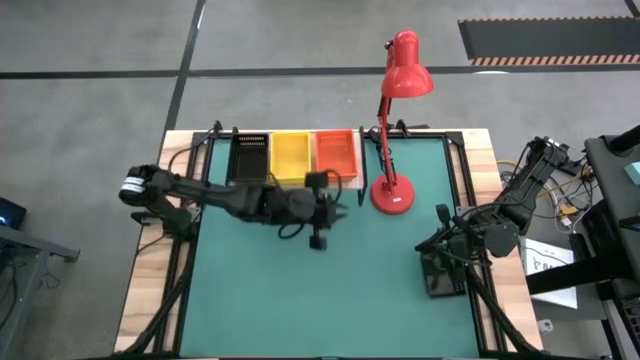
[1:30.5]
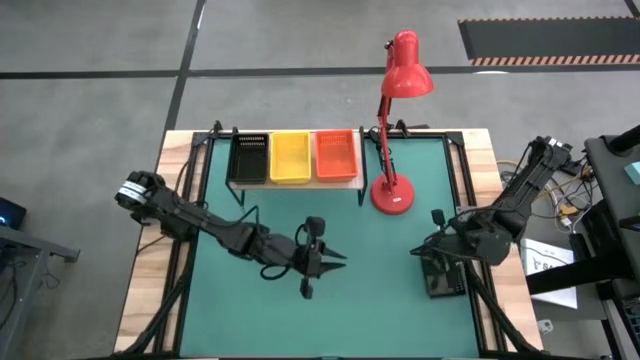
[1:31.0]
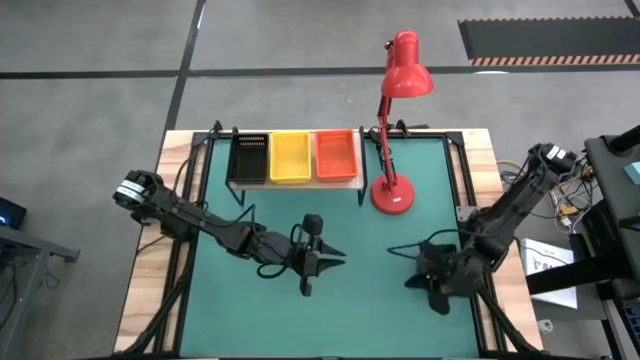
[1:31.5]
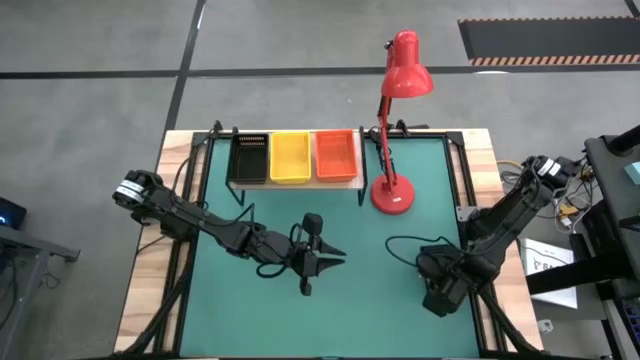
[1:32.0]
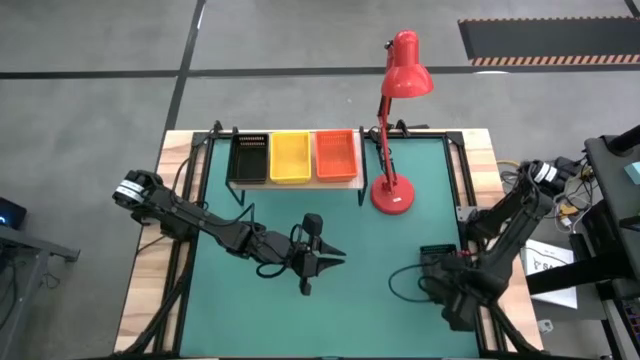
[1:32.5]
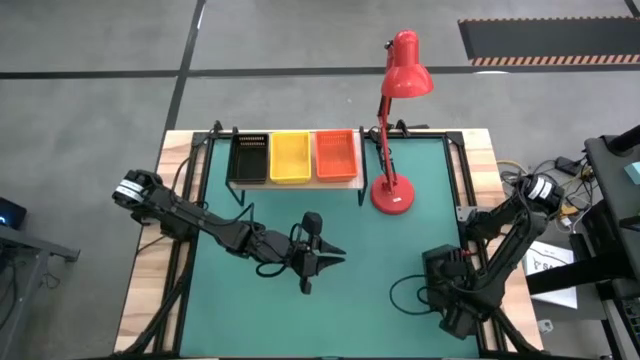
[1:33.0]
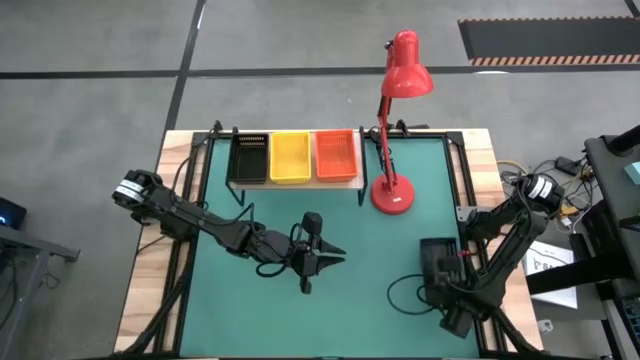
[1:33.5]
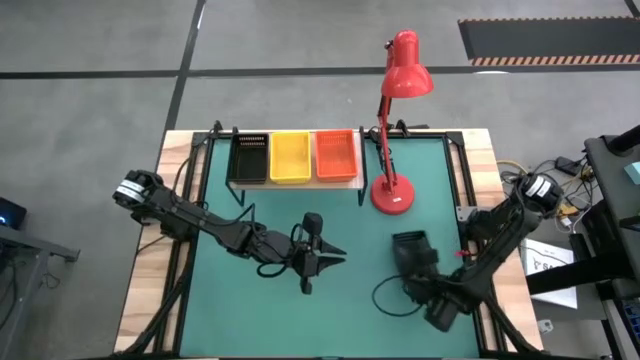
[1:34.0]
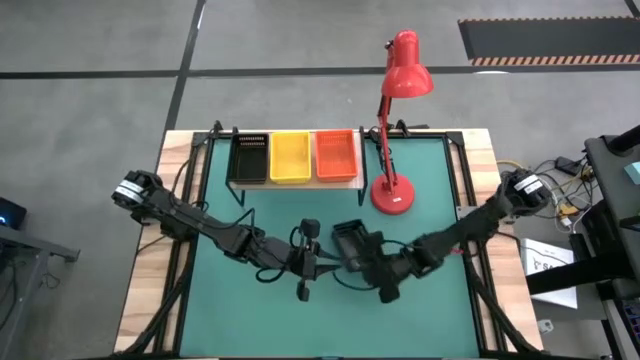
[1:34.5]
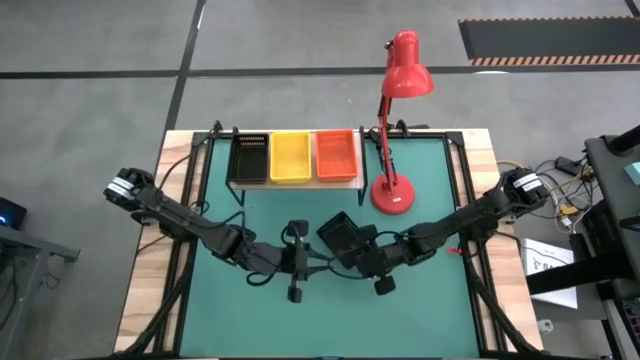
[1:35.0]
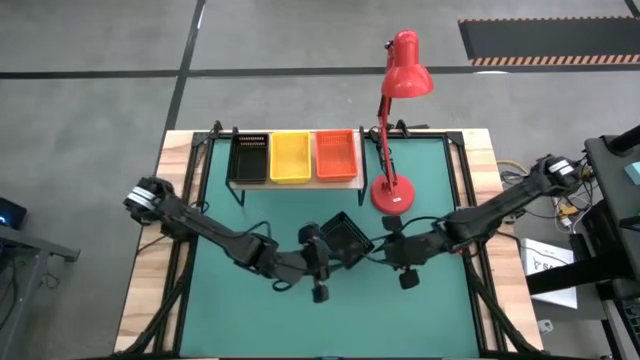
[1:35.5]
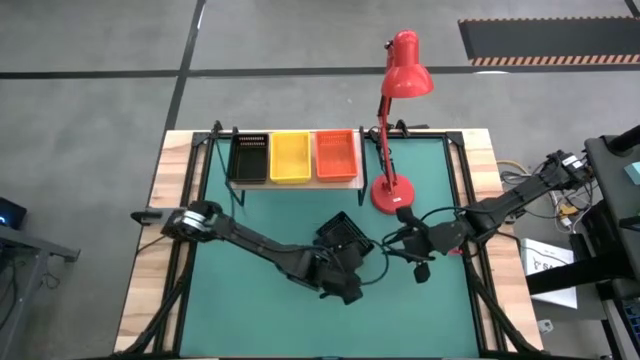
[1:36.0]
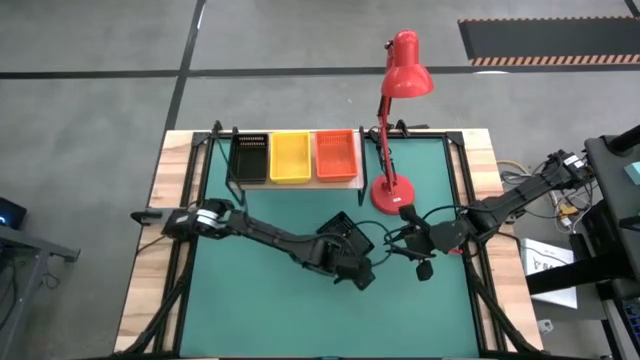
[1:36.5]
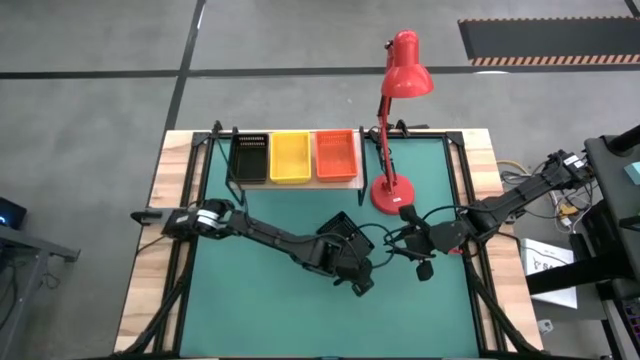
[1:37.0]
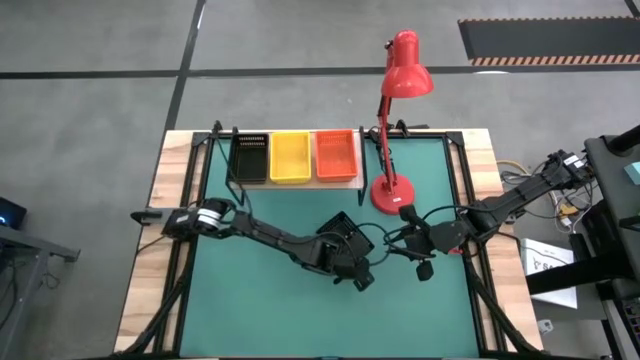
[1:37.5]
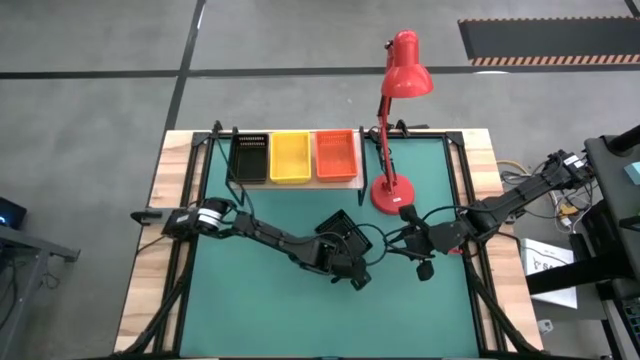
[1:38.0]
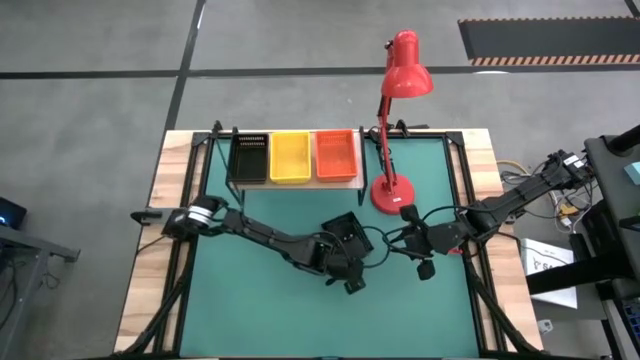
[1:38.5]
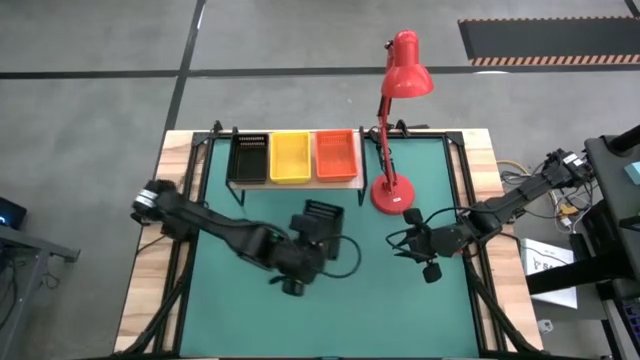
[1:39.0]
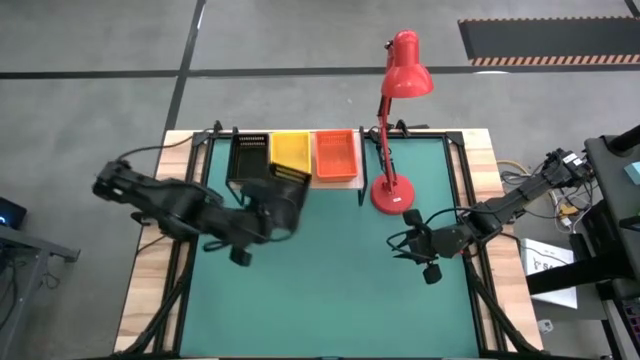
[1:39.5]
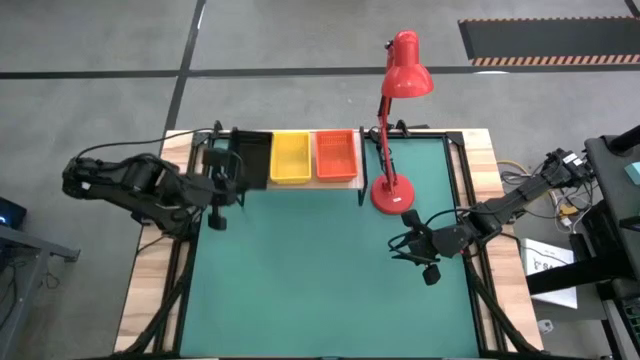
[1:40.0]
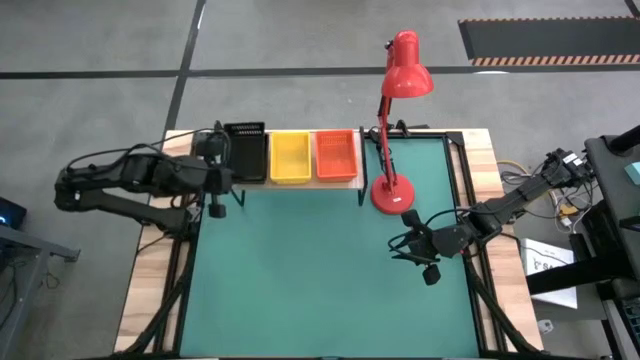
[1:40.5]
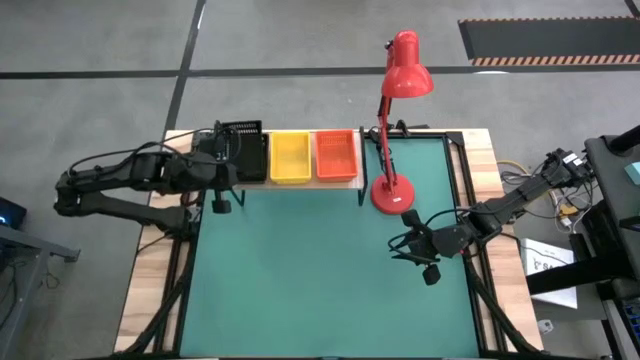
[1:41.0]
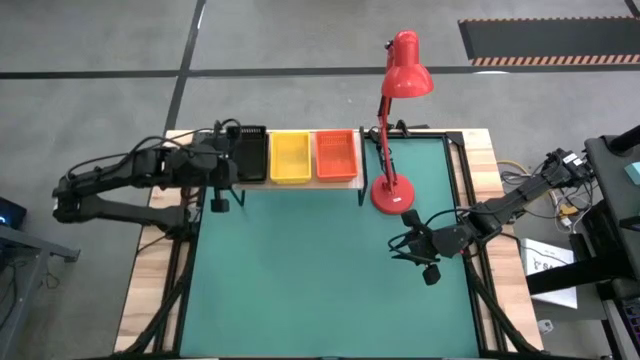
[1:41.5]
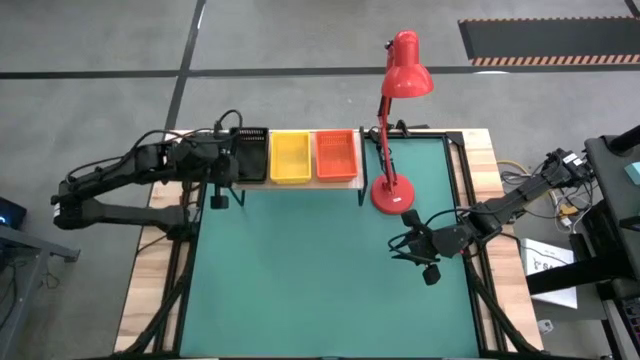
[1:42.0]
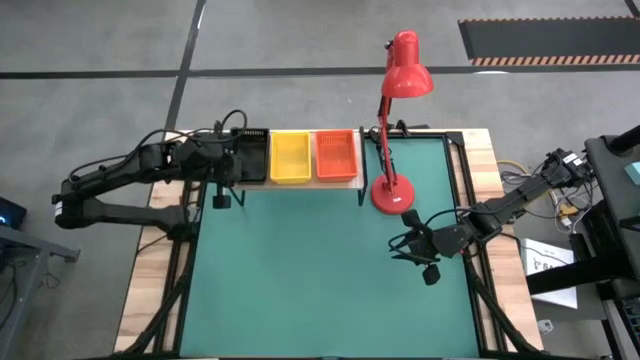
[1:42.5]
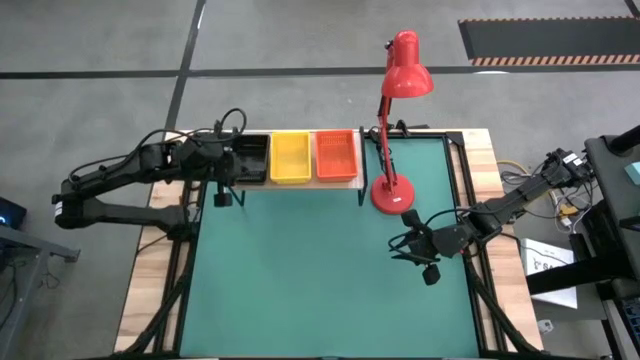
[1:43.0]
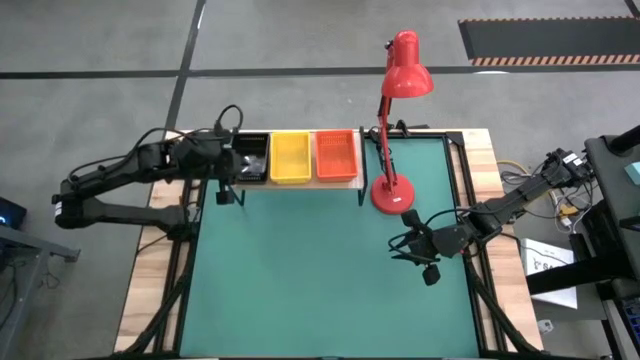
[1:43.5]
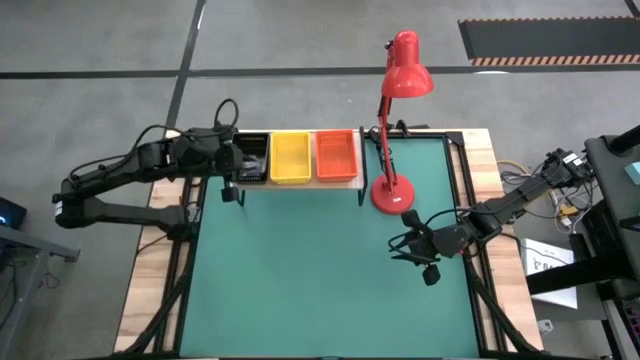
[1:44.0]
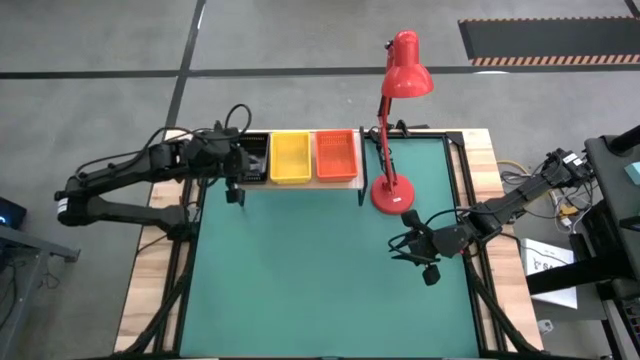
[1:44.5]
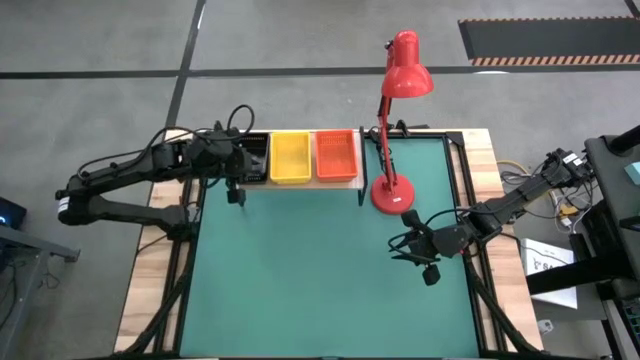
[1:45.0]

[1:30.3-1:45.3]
Task: Stack baskets on shelf by color
Stack the black bin on top of the black bins on the shelf

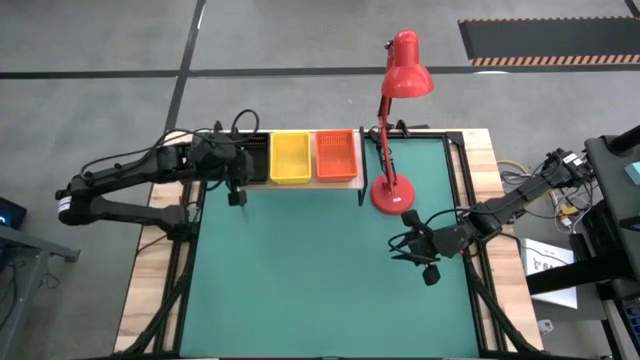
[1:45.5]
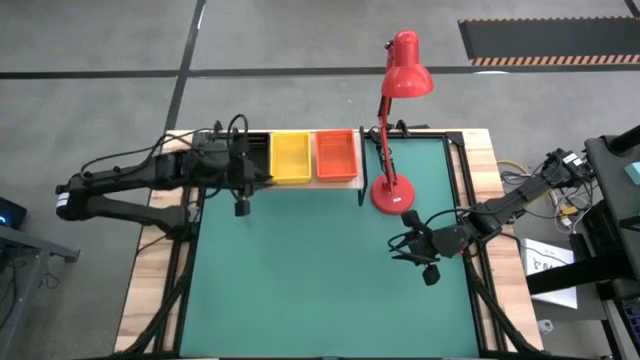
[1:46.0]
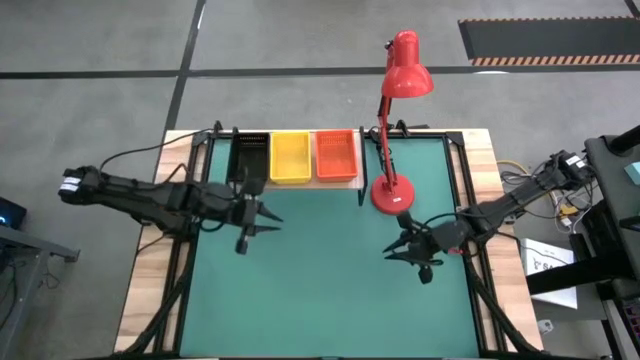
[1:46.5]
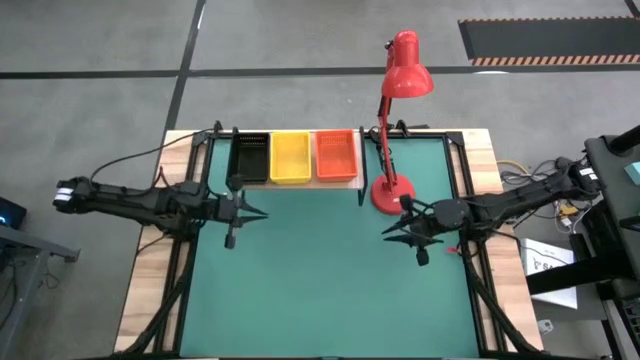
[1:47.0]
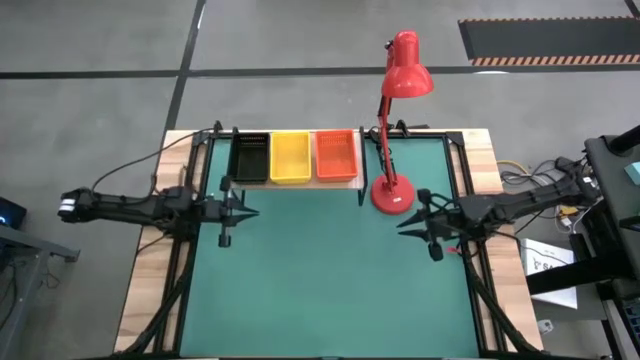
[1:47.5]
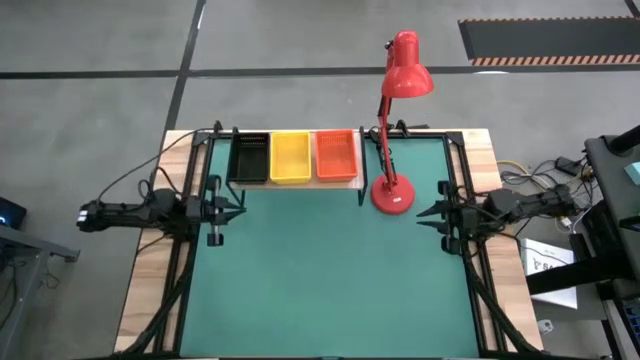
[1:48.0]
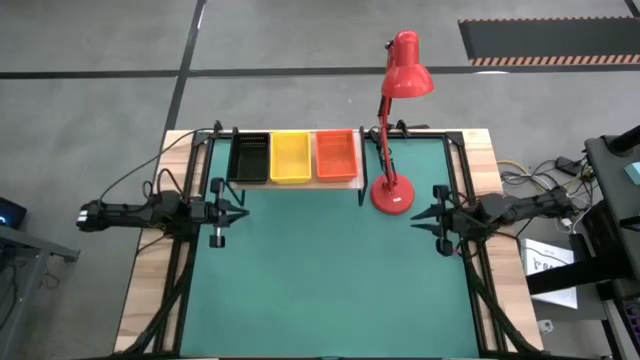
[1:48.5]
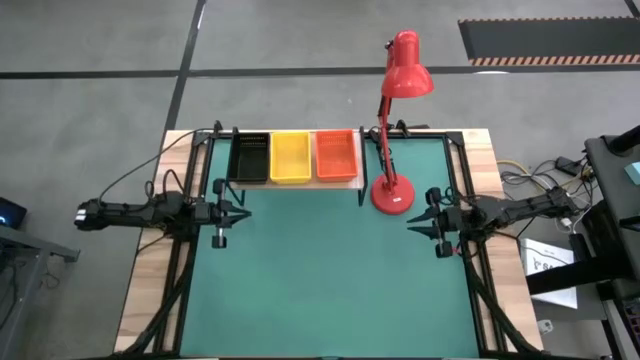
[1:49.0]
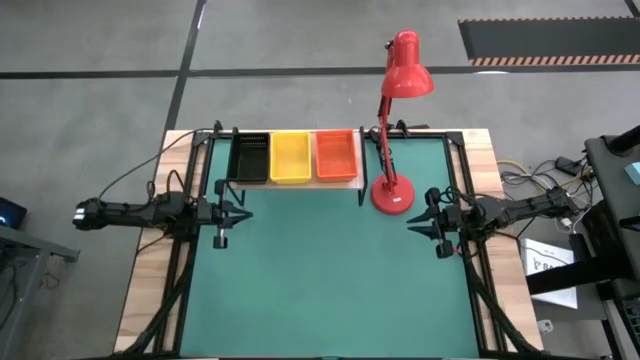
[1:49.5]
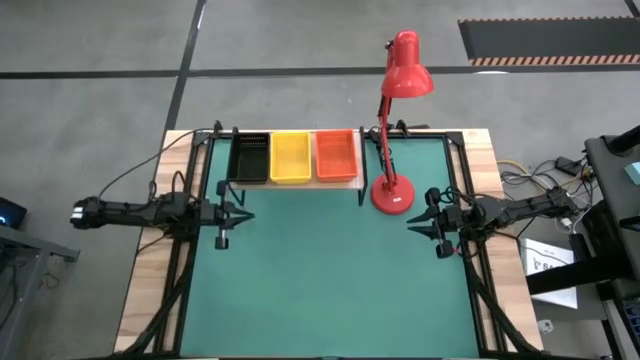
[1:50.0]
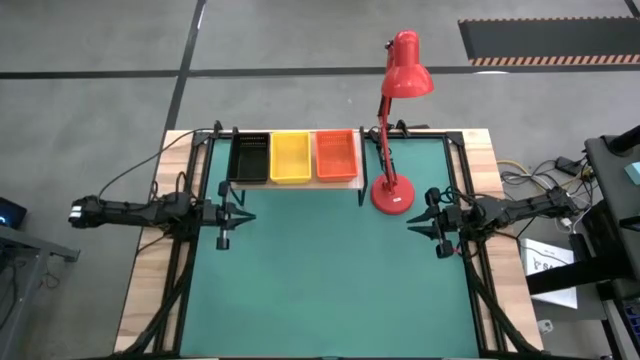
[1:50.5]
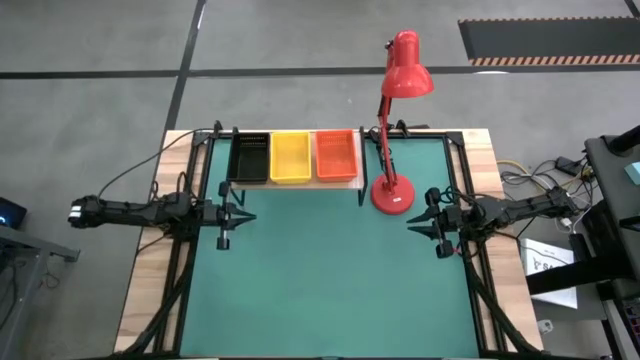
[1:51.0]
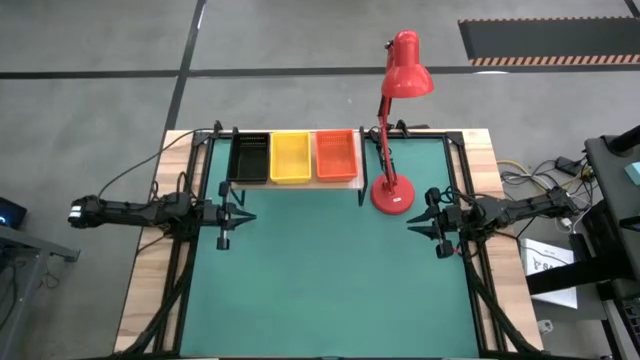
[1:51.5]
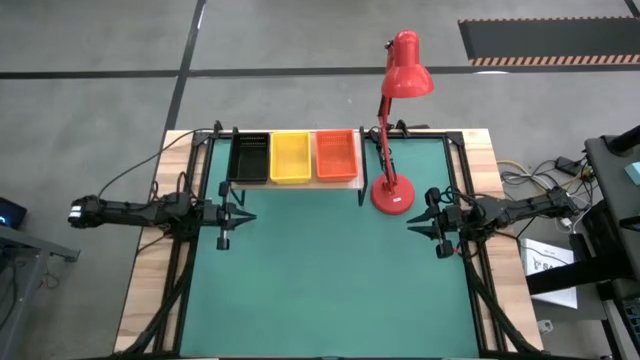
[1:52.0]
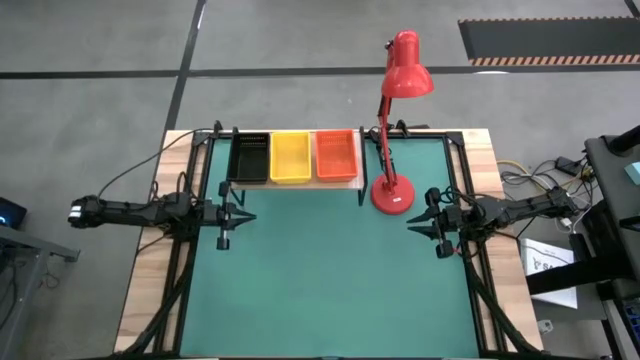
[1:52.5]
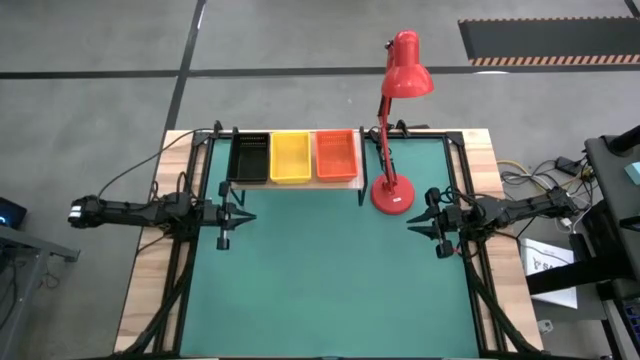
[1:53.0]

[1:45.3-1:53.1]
Return to Home Position
